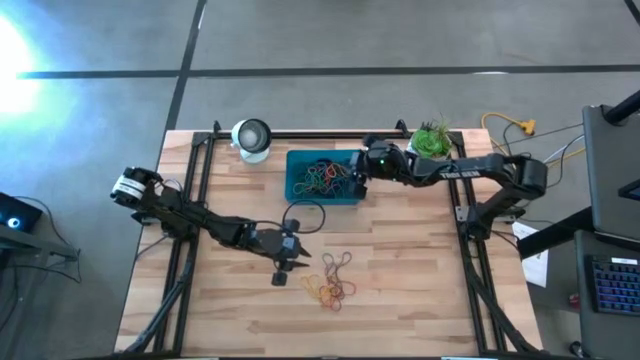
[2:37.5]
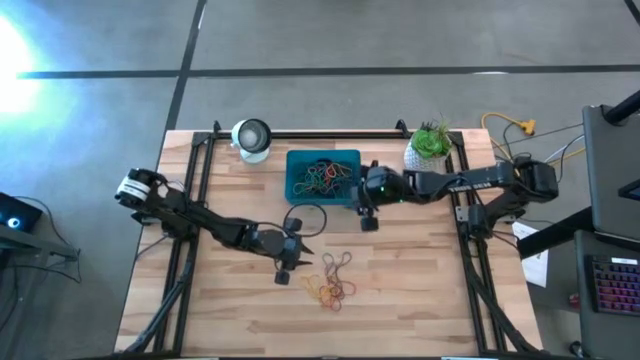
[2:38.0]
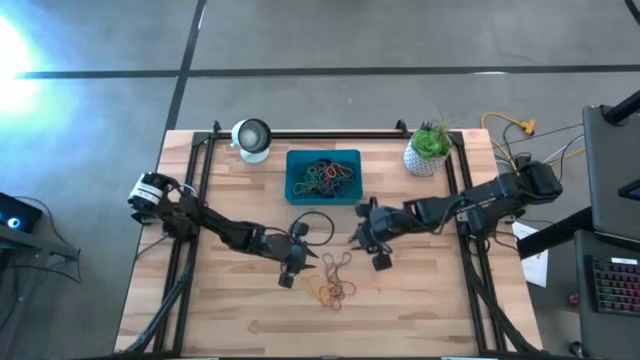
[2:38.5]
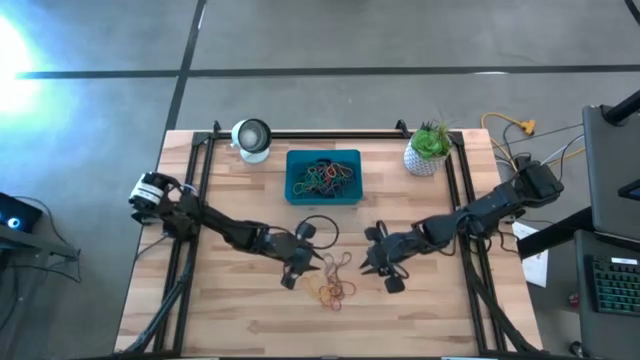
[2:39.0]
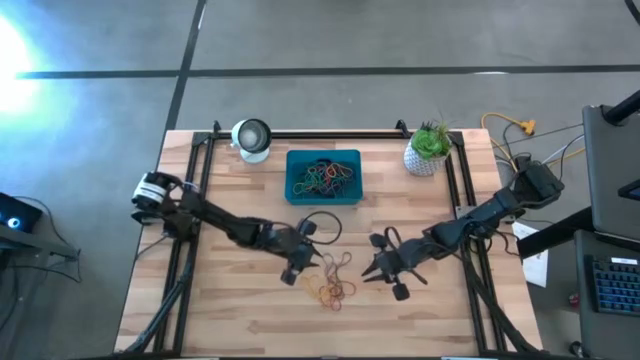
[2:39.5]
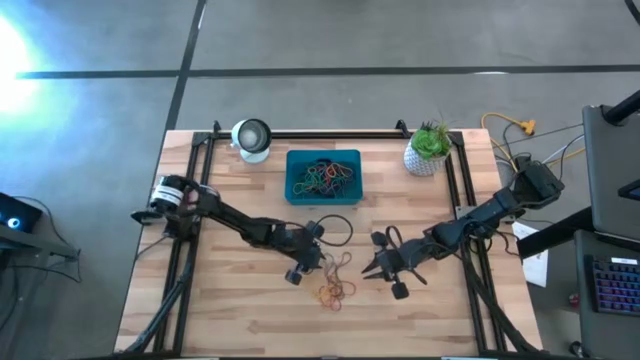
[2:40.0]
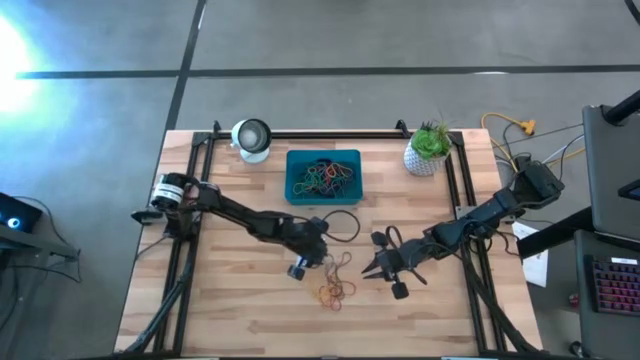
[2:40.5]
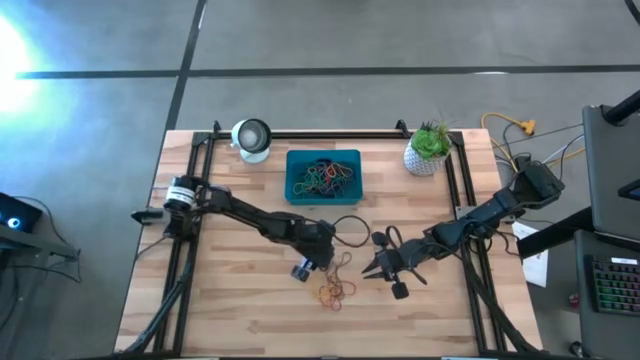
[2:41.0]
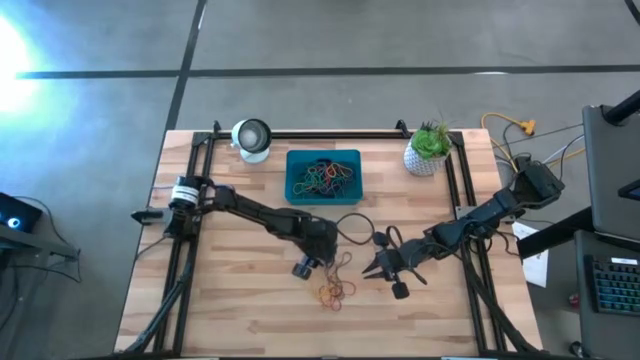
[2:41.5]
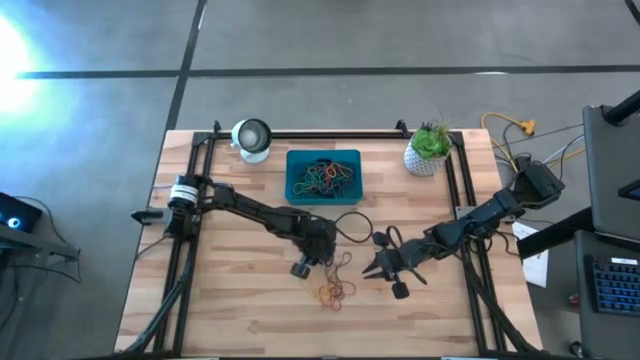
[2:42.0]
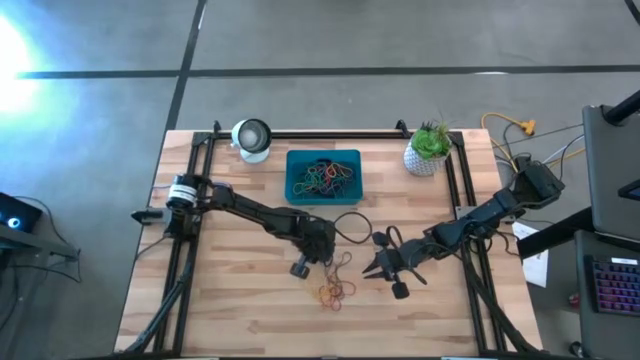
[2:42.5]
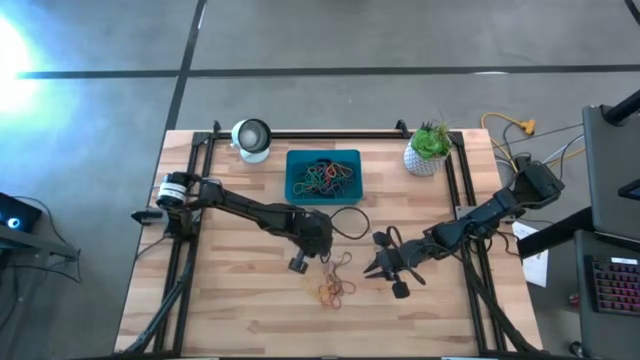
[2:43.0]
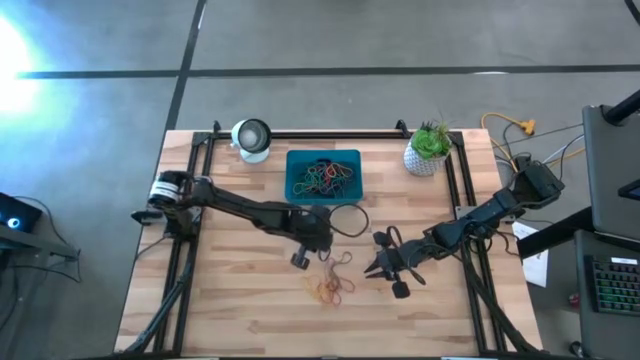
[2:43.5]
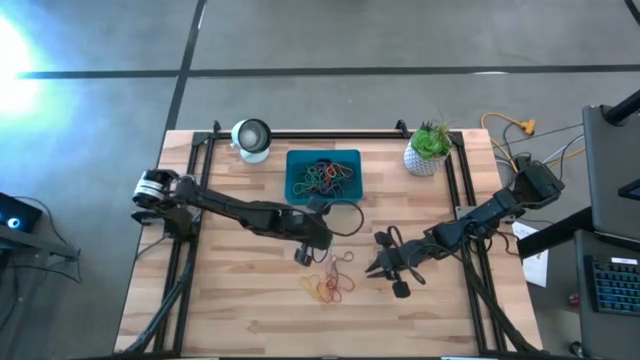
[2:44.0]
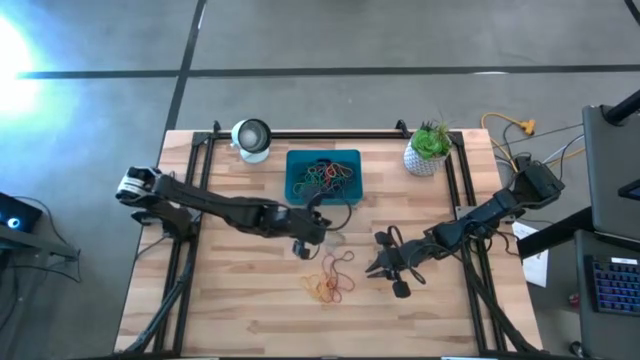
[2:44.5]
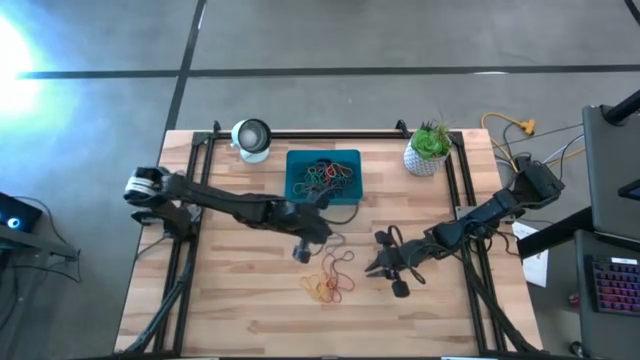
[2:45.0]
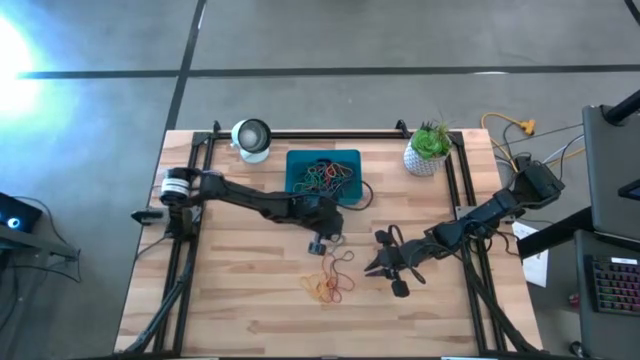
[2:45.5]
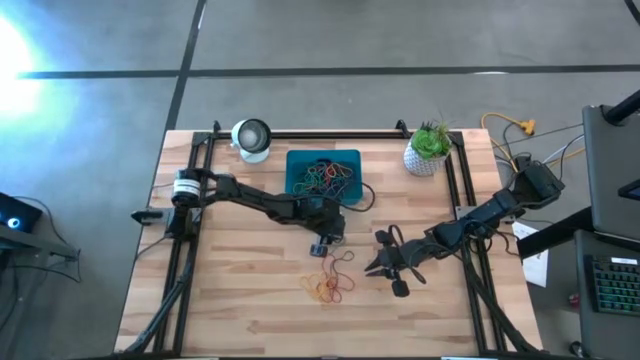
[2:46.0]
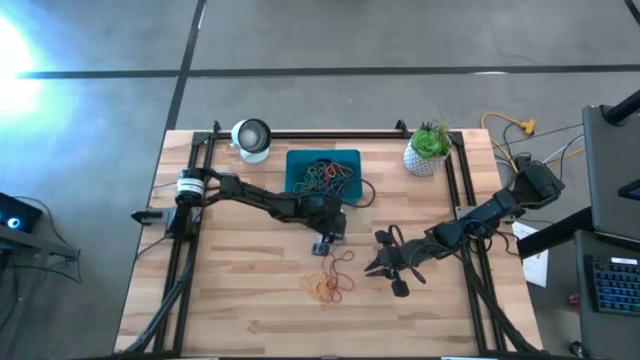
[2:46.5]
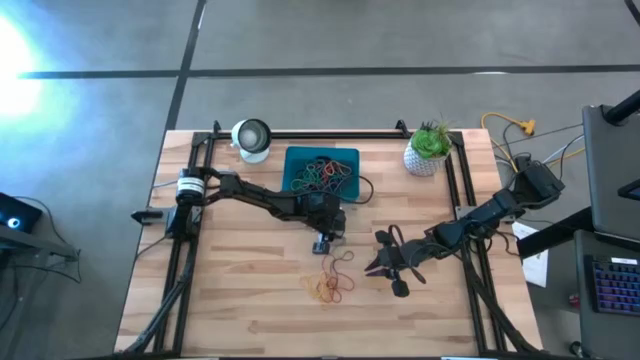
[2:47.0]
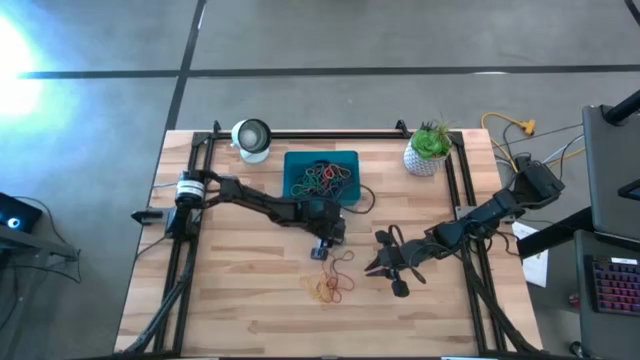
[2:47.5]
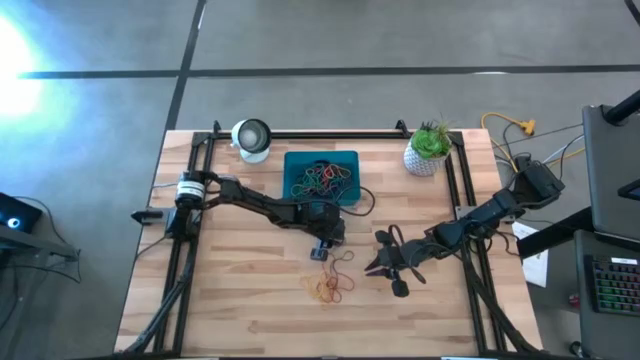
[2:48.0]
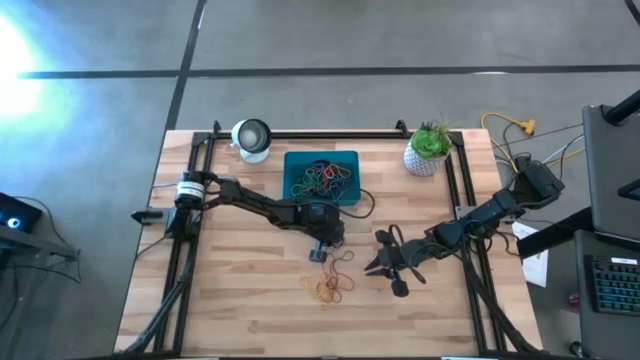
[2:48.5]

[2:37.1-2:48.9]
Task: Pick and place rubber bands into bin
Put the blue rubber band into the bin

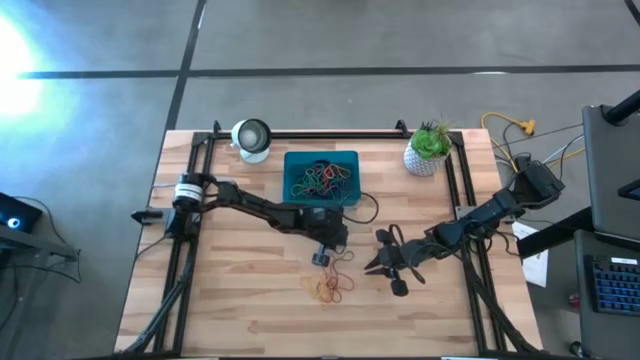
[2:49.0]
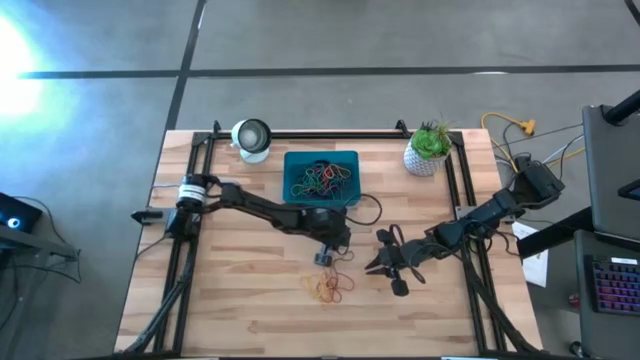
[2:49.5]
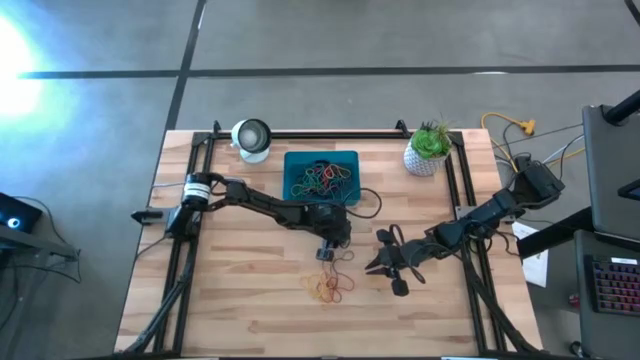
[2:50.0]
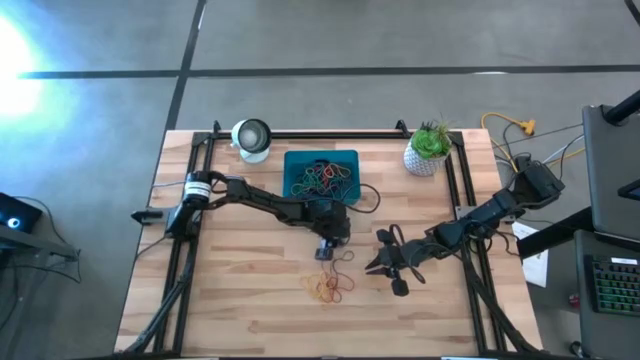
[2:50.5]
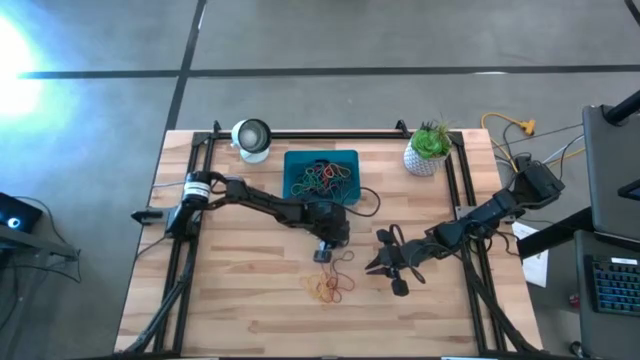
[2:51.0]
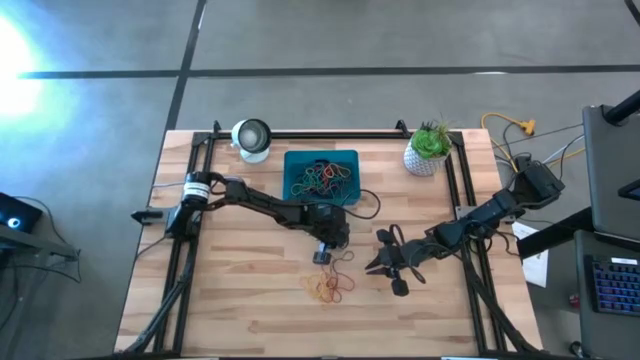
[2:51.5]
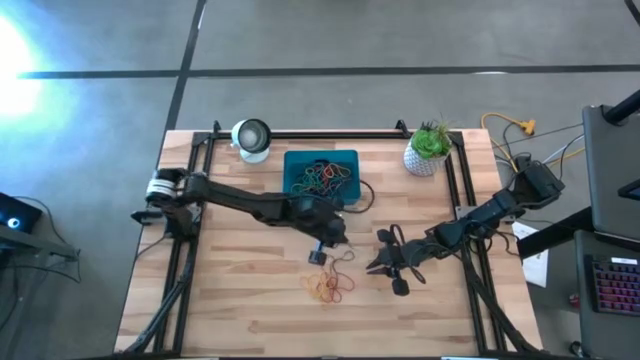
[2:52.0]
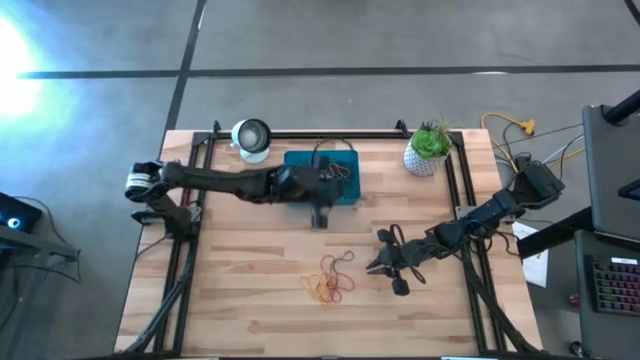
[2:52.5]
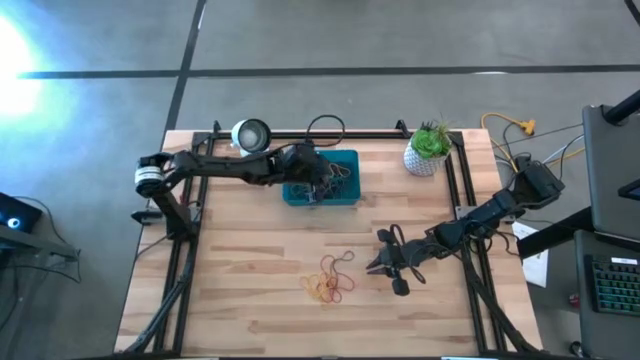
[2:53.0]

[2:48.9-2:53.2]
Put the blue rubber band into the bin

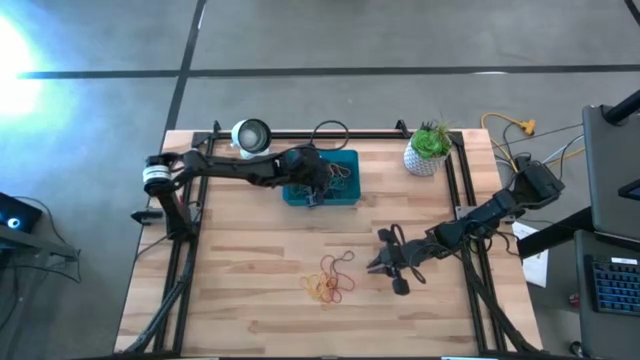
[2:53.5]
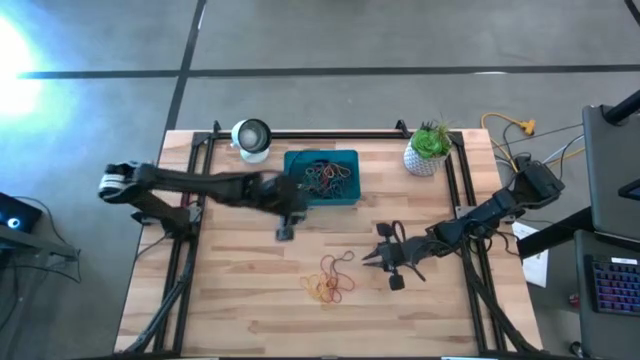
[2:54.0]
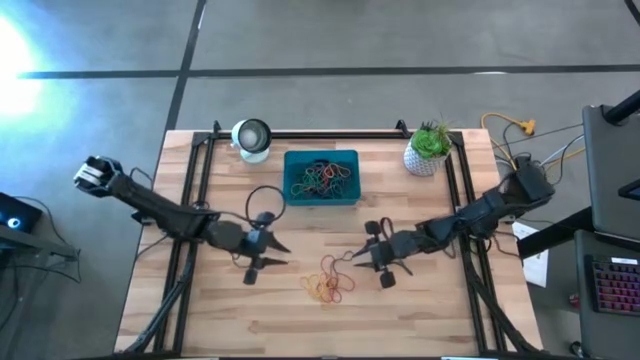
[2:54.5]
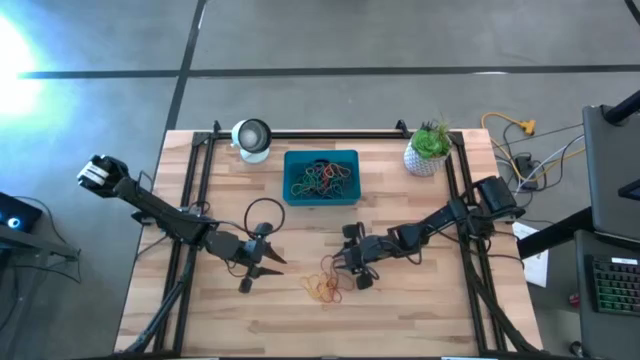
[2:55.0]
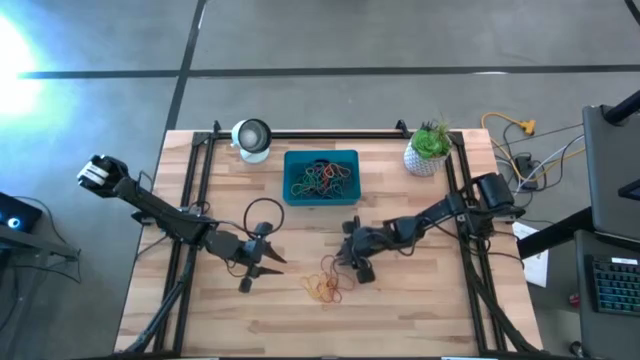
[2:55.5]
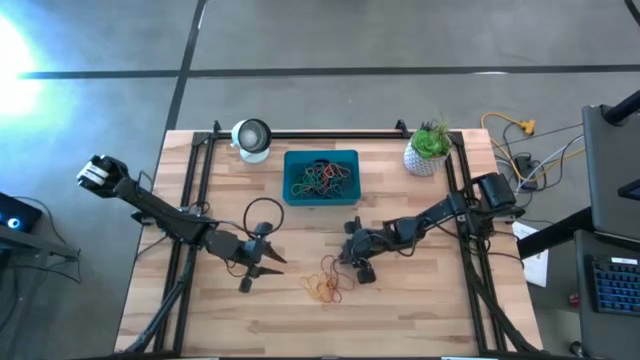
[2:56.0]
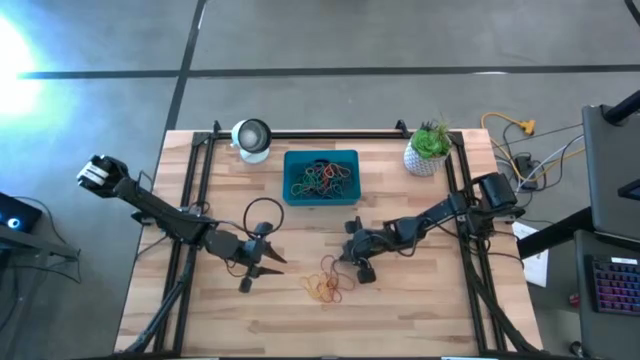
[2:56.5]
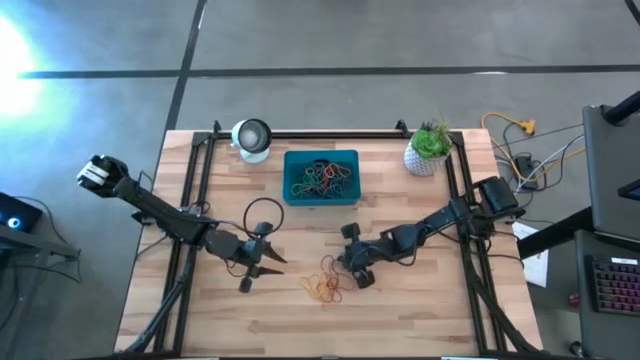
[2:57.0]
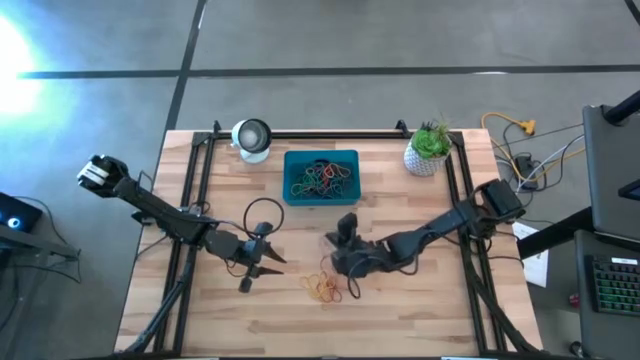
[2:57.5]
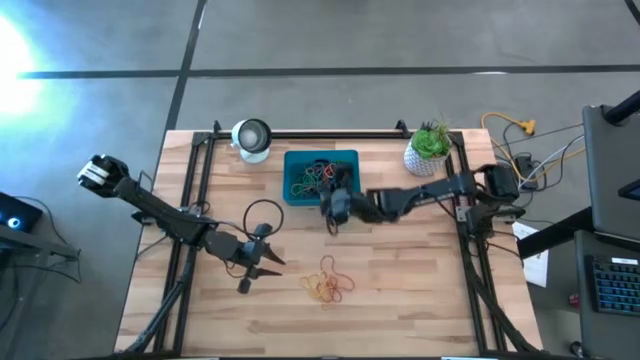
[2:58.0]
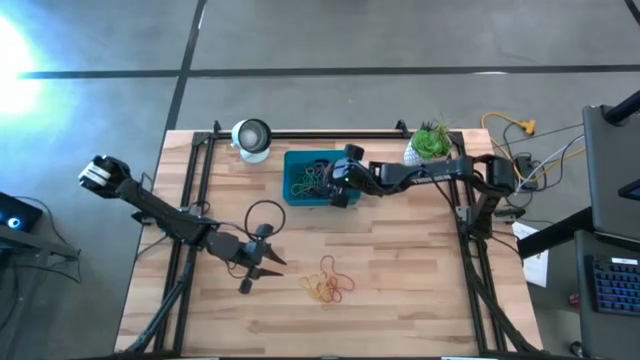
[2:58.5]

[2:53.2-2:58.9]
Put the purple rubber band into the bin
